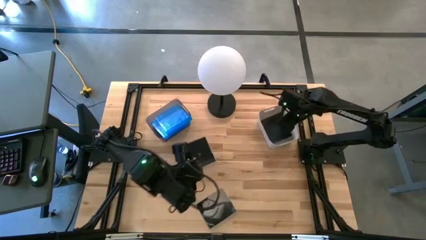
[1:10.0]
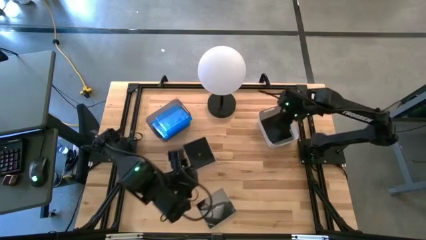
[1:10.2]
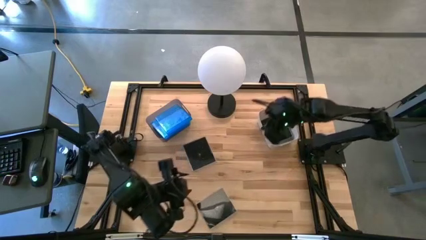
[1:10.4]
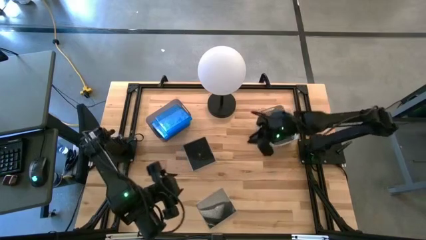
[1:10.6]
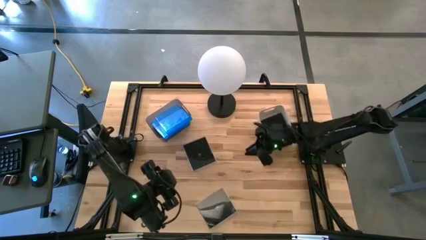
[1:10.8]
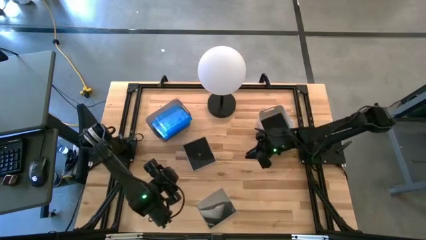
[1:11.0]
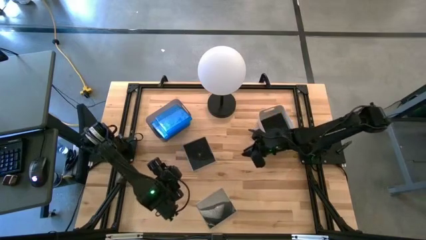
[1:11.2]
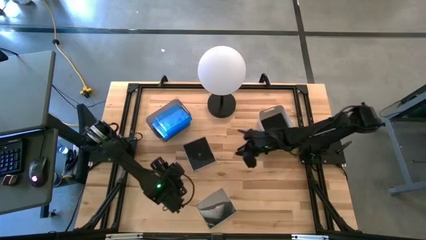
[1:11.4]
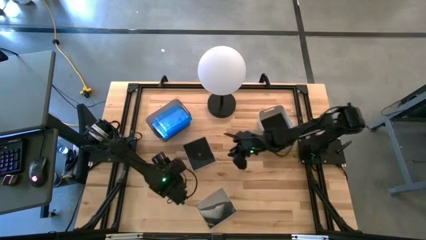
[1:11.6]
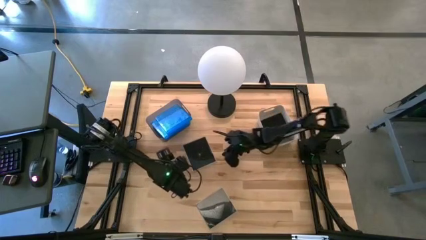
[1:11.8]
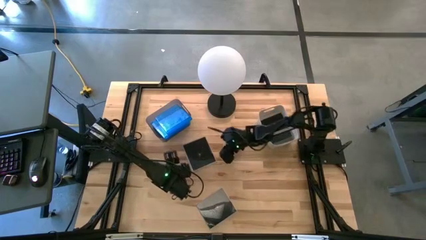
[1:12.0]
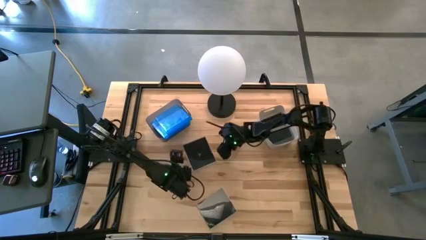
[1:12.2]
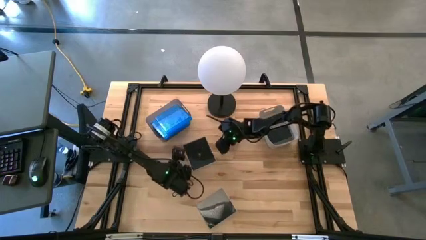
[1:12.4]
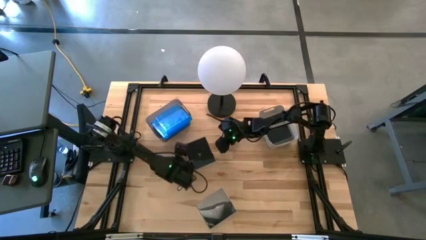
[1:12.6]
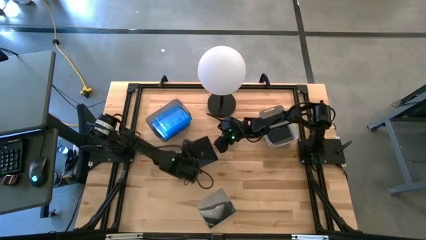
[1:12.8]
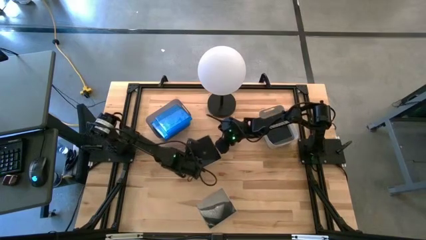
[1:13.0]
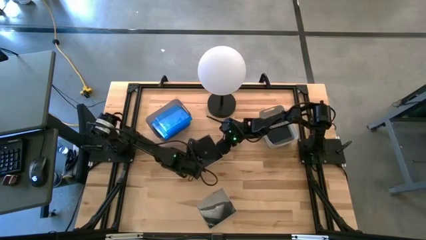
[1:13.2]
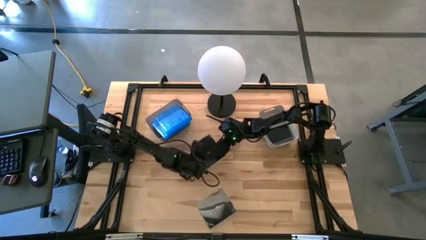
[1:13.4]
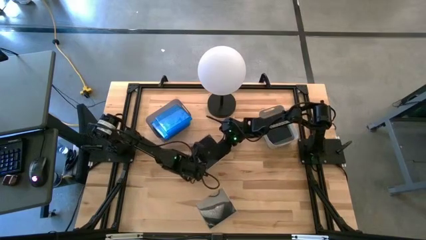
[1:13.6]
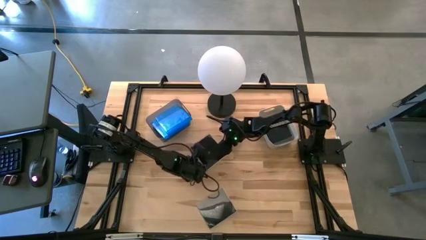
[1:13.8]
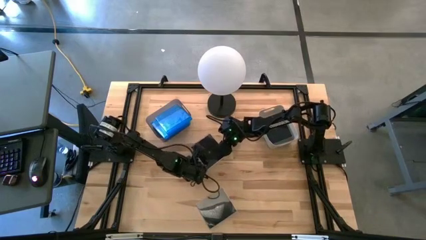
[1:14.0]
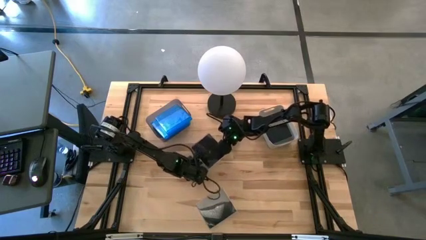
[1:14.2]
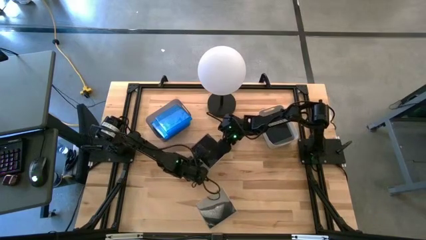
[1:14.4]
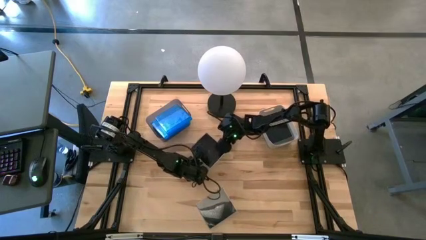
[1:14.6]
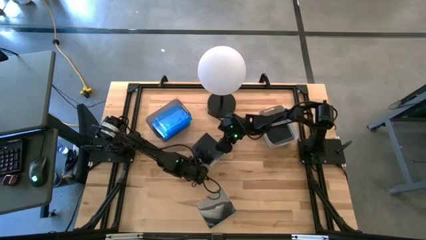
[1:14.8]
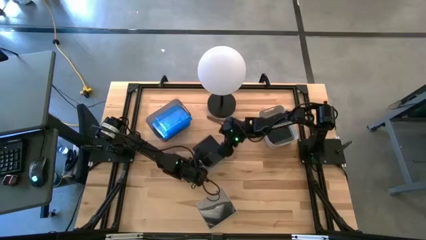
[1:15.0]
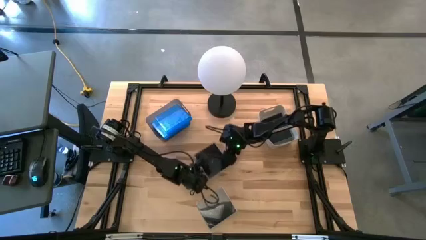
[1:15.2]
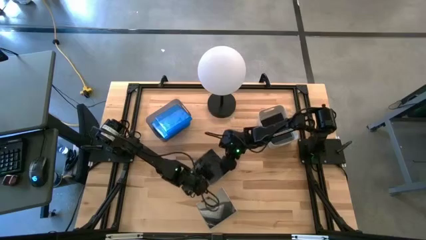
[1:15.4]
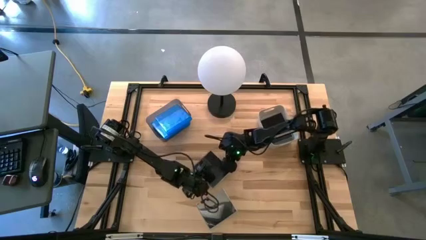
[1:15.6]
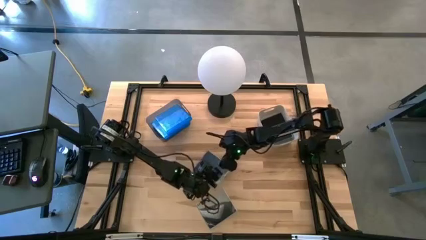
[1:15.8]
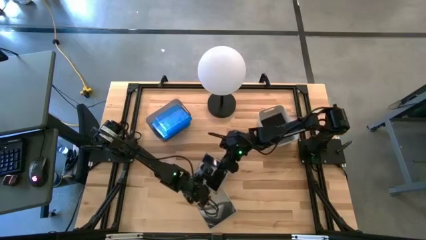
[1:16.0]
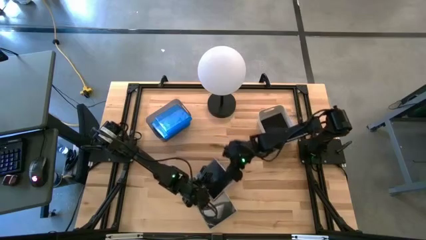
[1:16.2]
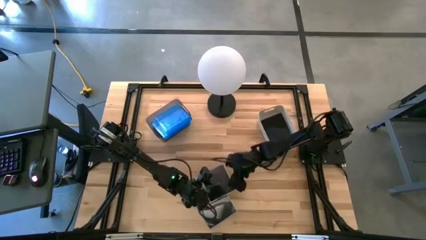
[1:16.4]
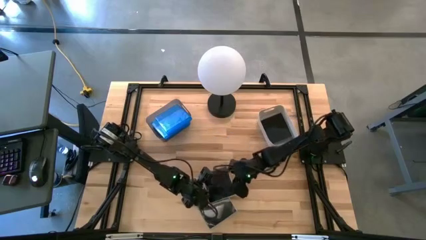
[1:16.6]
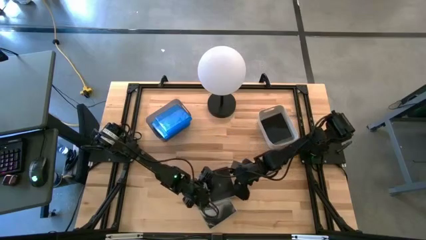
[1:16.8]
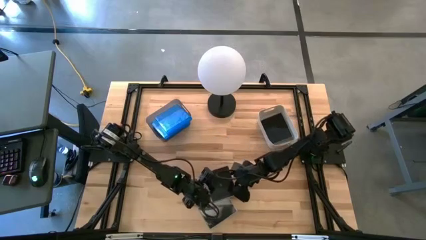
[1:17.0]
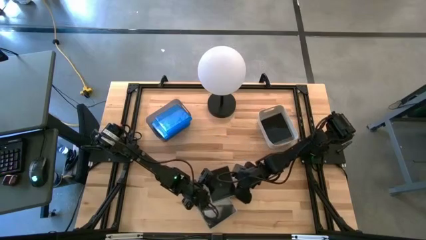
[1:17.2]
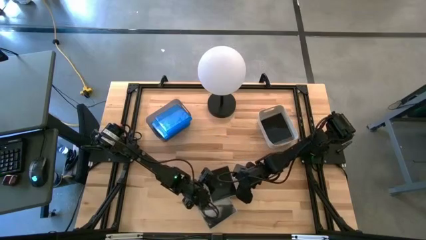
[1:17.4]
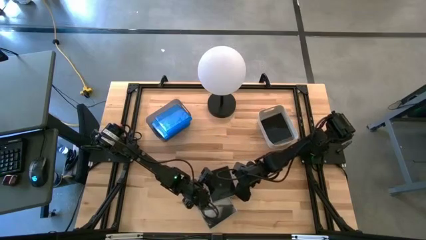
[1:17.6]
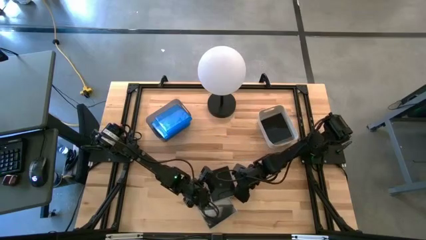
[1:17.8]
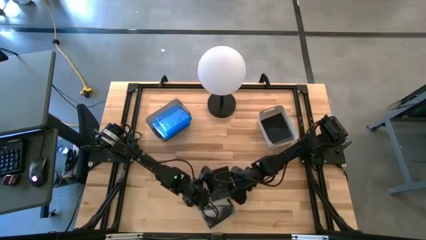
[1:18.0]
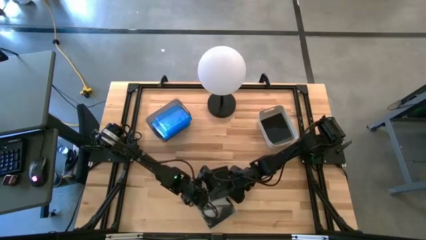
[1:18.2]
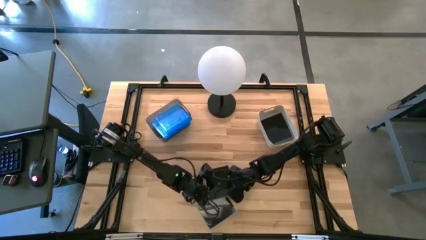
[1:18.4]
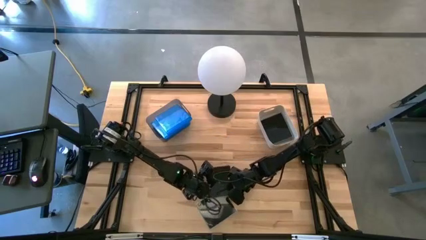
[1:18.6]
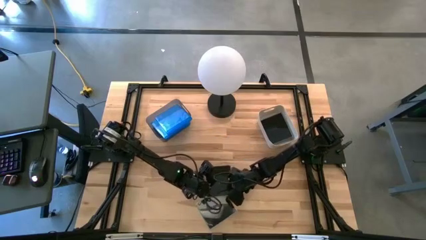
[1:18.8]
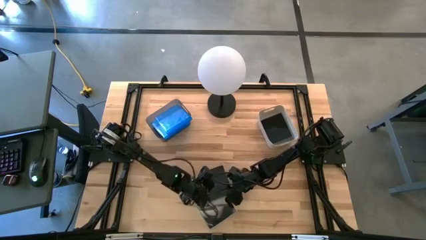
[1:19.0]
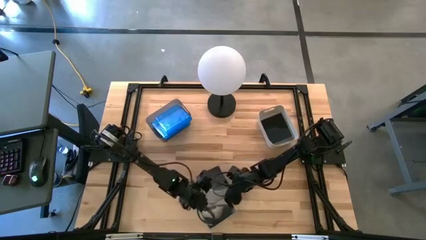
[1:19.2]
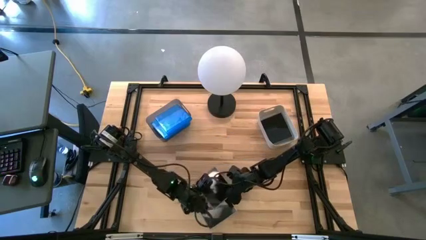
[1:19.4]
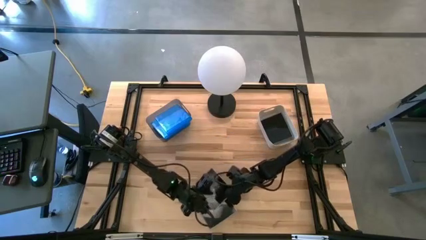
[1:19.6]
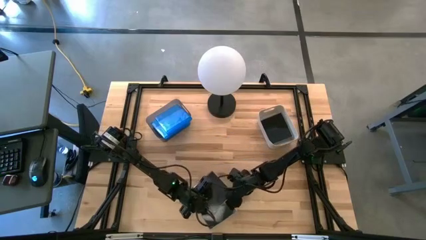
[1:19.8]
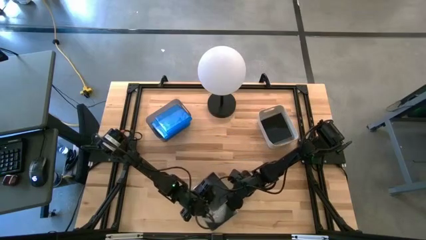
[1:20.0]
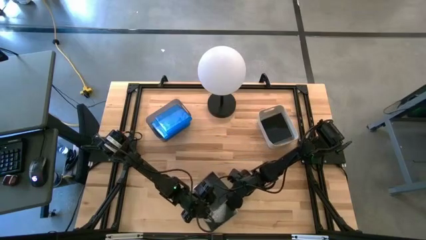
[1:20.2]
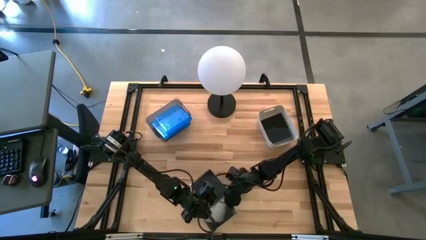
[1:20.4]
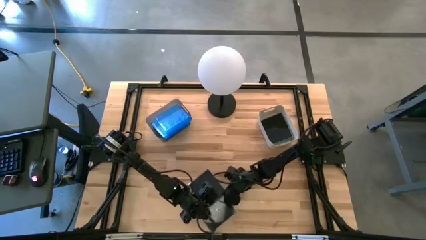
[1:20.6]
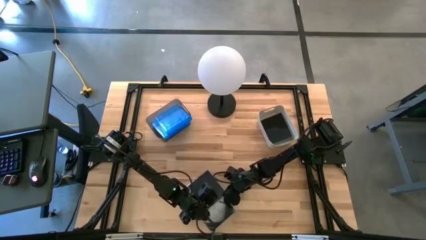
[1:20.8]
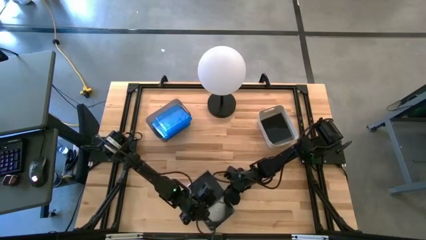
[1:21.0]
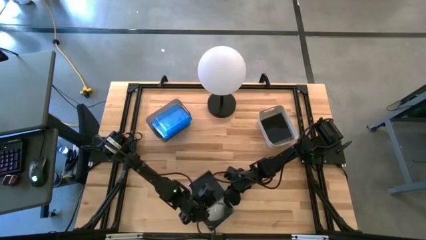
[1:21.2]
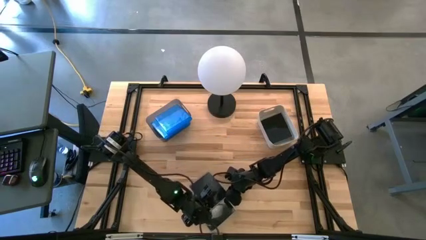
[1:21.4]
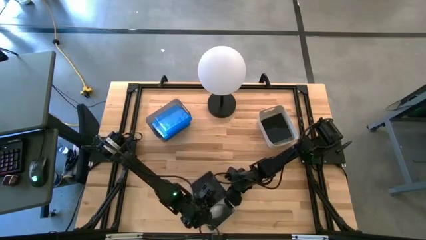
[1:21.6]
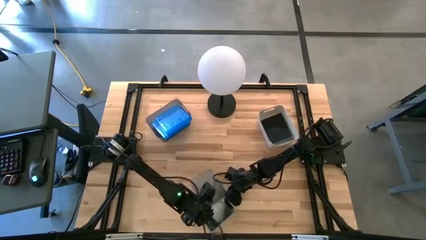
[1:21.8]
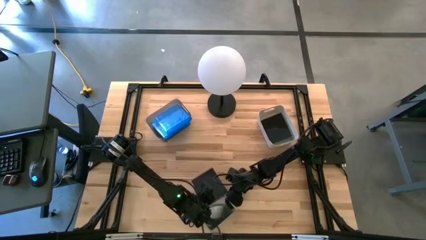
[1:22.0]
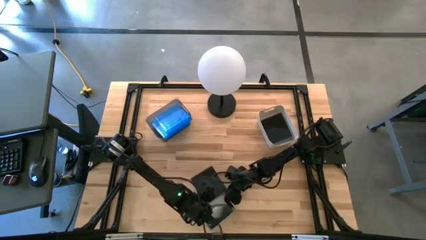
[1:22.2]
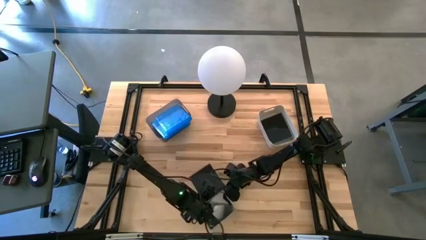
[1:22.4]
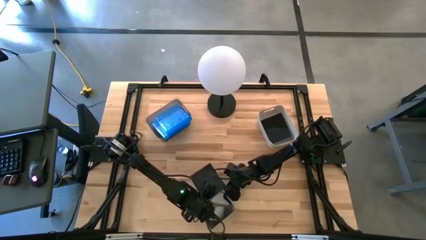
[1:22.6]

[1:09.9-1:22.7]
Task: Pick & place jewel cases by type
Put the top black CD case into the gray bin

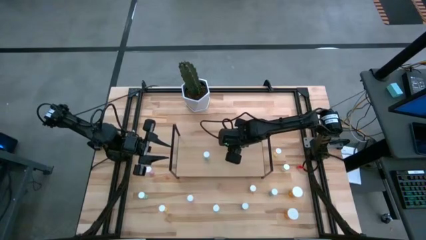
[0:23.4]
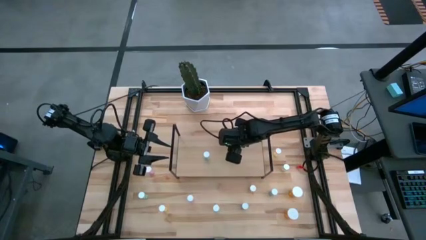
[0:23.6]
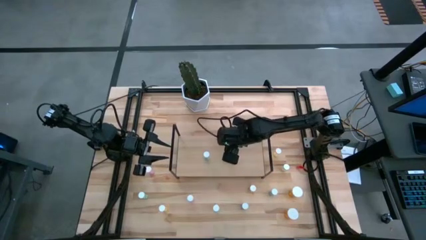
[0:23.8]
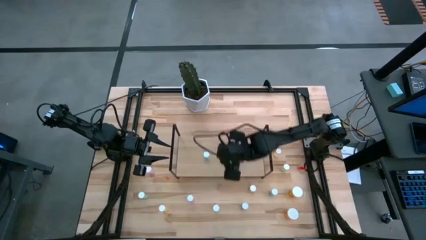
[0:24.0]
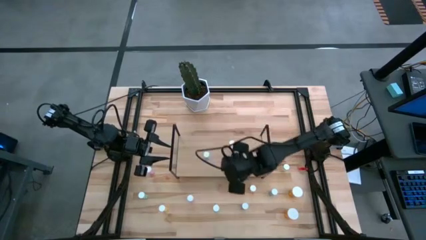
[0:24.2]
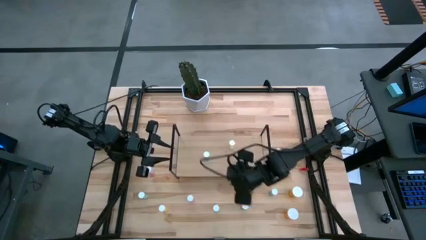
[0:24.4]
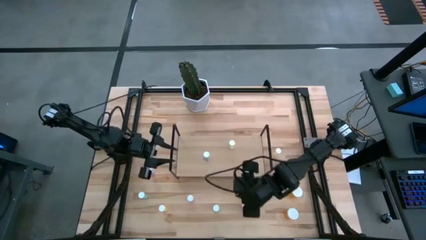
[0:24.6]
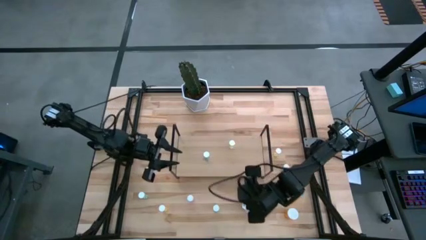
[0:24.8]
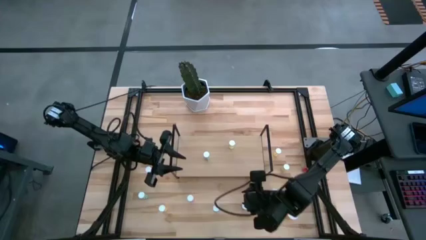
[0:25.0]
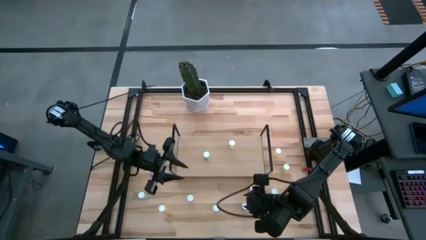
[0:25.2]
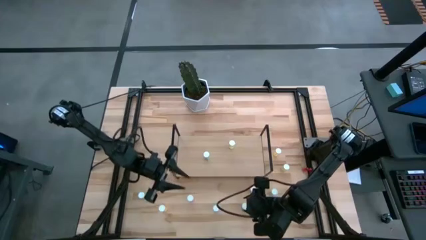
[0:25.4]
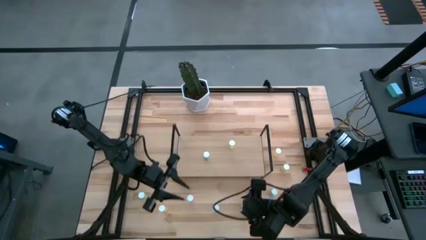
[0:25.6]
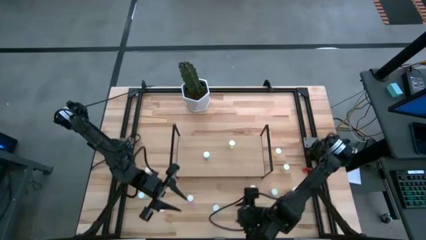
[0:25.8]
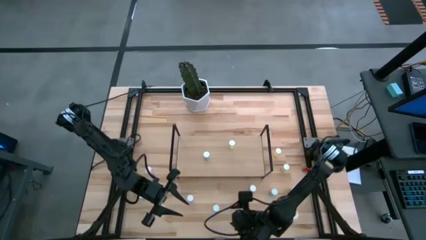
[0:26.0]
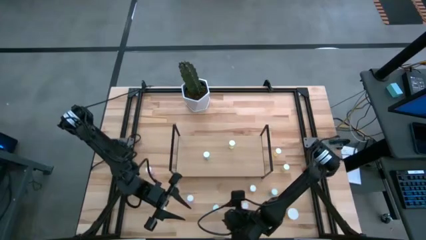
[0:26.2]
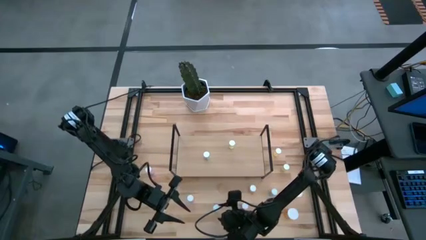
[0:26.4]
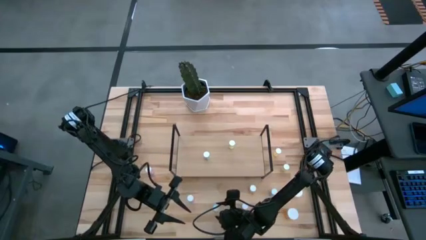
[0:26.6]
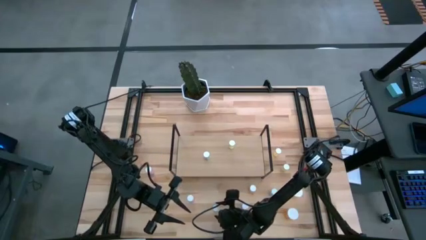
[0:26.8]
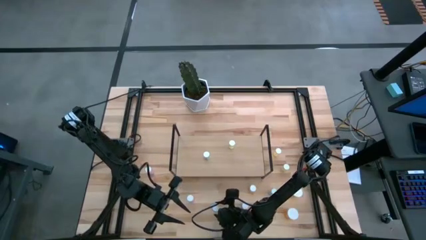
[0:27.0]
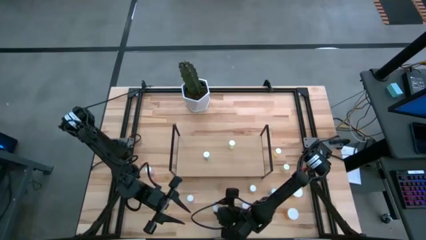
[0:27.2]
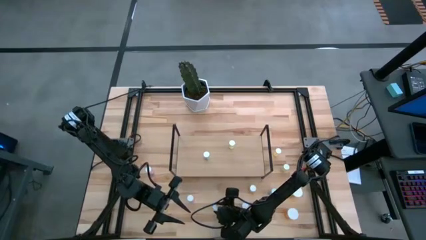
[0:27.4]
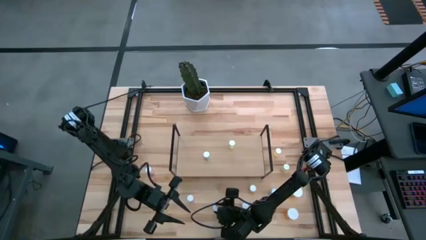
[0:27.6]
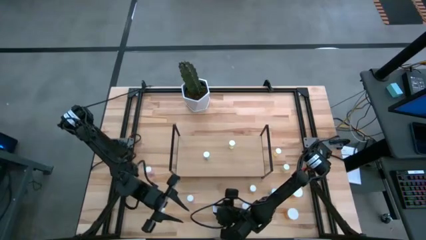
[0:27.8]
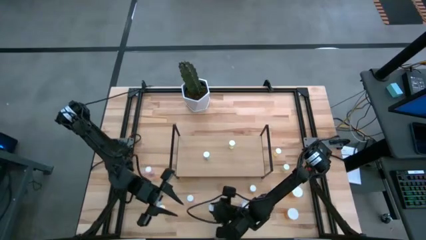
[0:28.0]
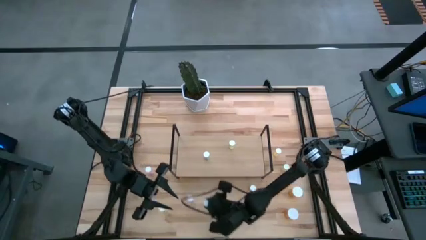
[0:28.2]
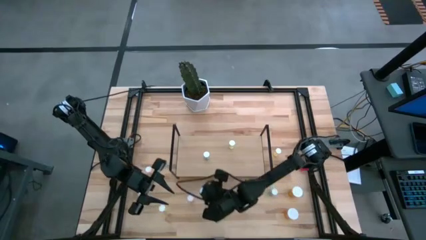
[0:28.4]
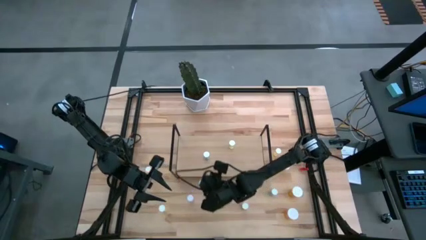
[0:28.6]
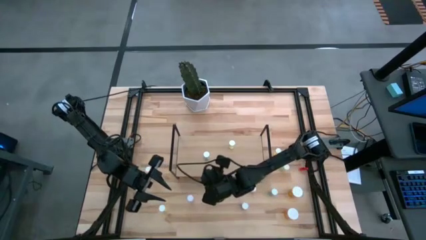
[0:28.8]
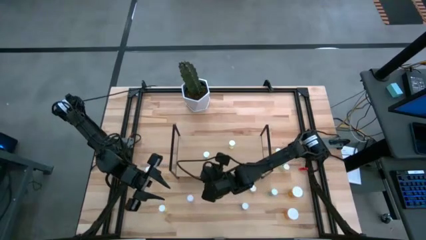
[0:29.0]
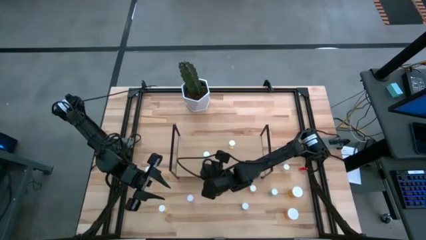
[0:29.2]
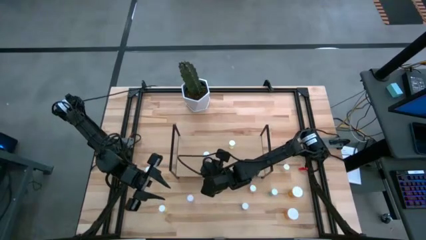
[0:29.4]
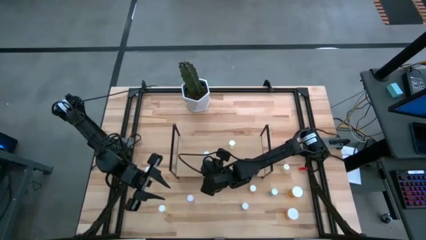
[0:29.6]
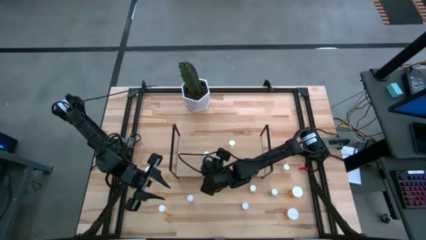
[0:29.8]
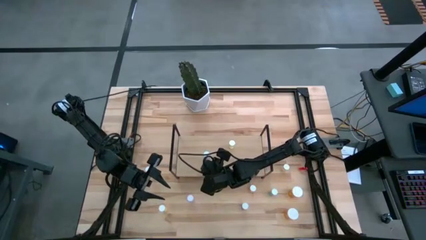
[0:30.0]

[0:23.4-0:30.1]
Task: Pick and place medicine bottles onto shelf by color
Put the green pill bottle on the shelf aligned with the other green pill bottle
